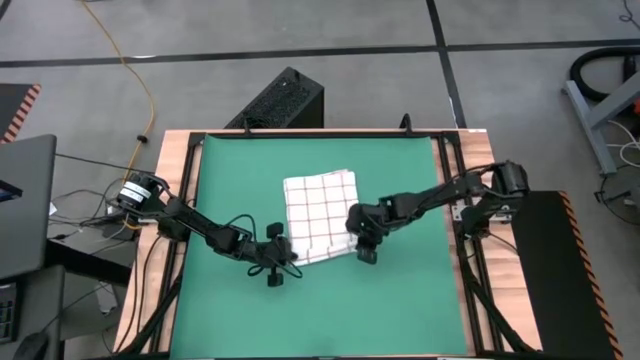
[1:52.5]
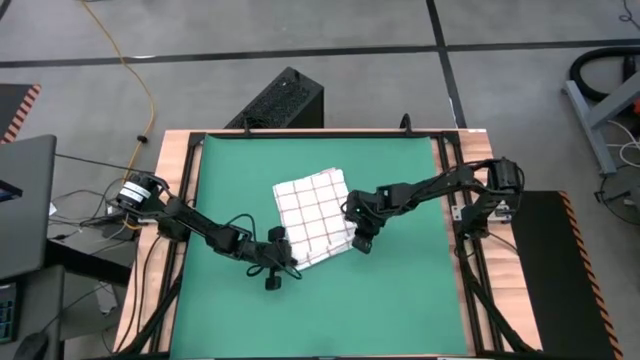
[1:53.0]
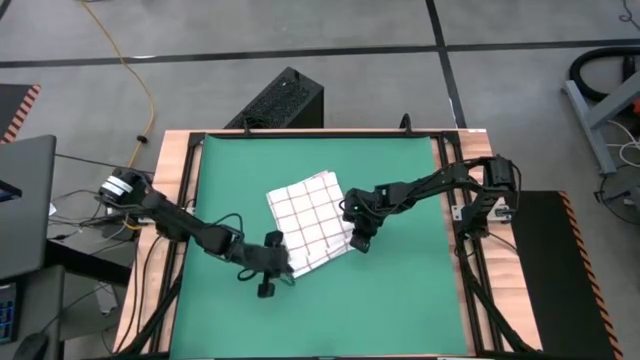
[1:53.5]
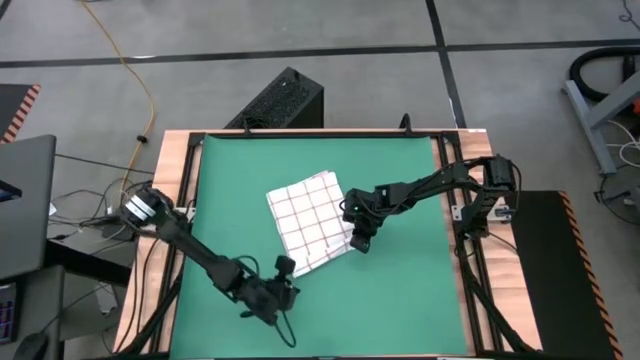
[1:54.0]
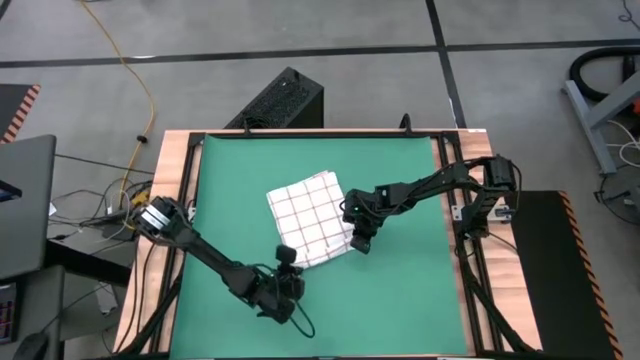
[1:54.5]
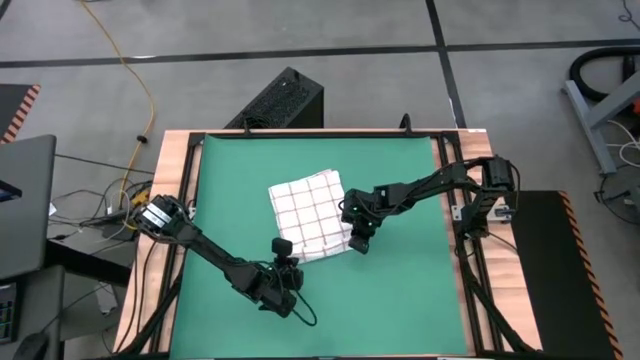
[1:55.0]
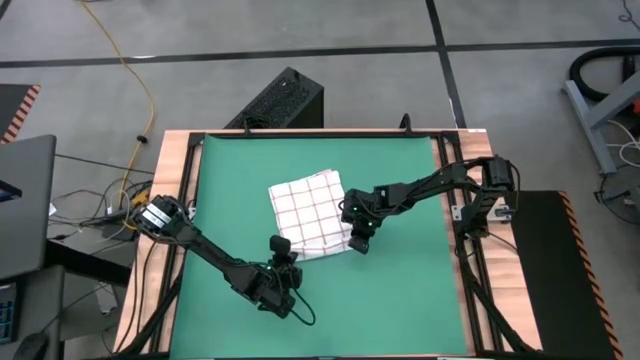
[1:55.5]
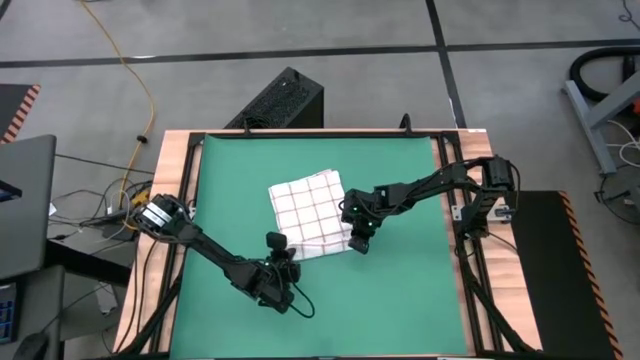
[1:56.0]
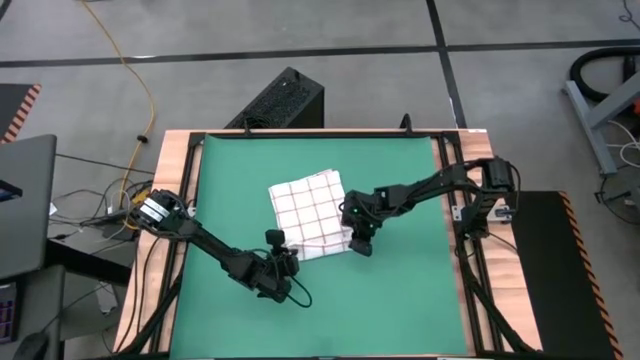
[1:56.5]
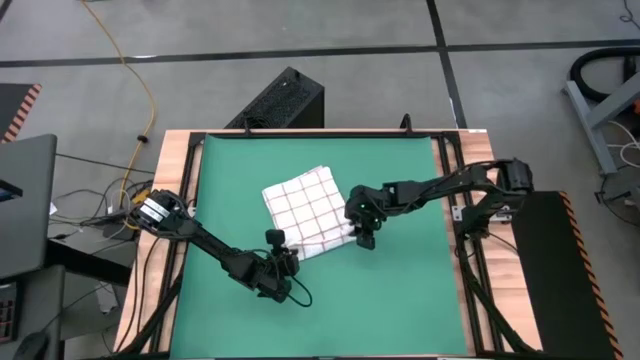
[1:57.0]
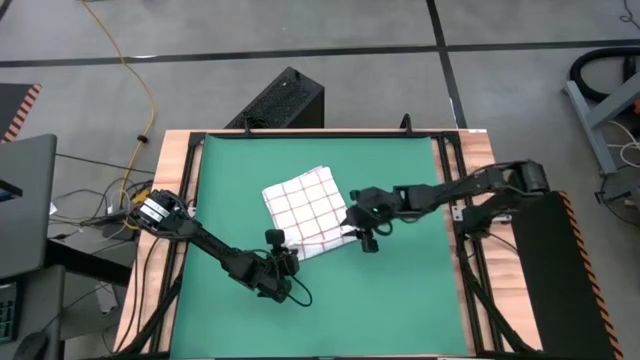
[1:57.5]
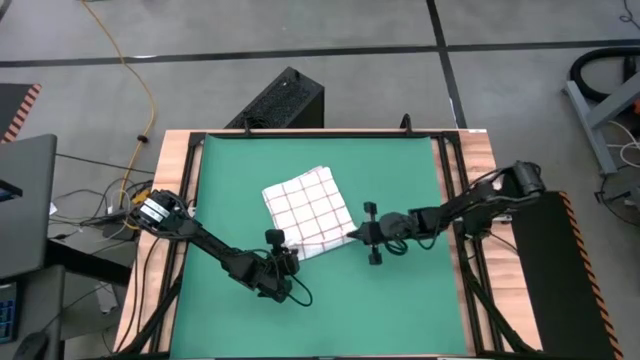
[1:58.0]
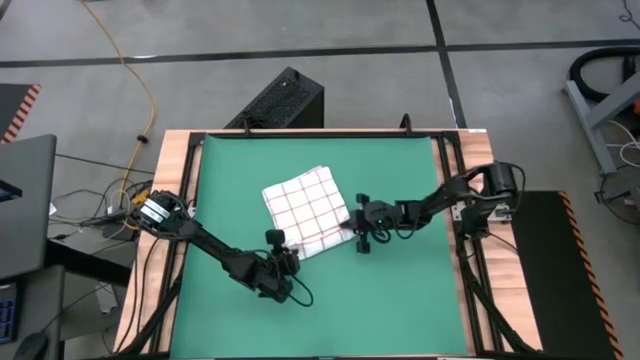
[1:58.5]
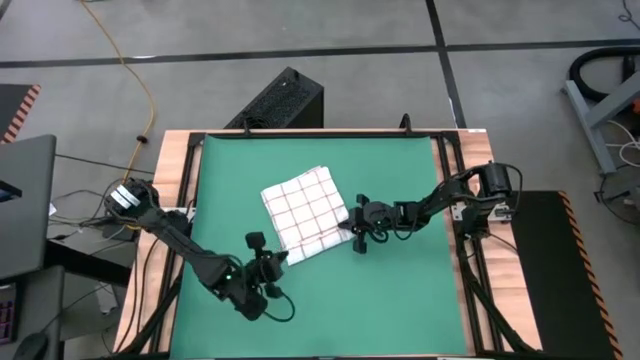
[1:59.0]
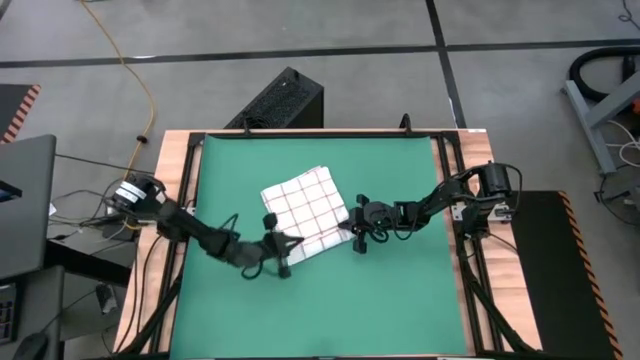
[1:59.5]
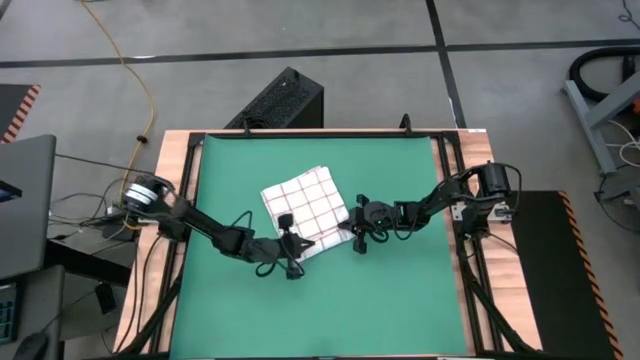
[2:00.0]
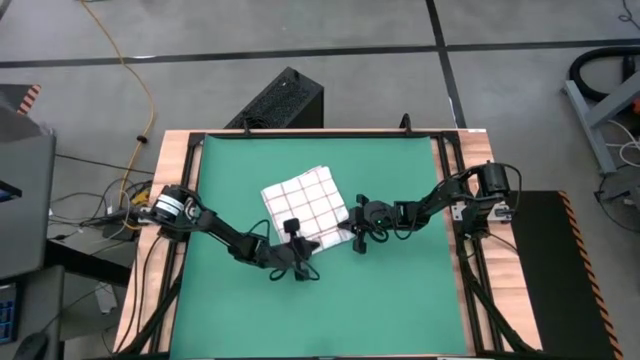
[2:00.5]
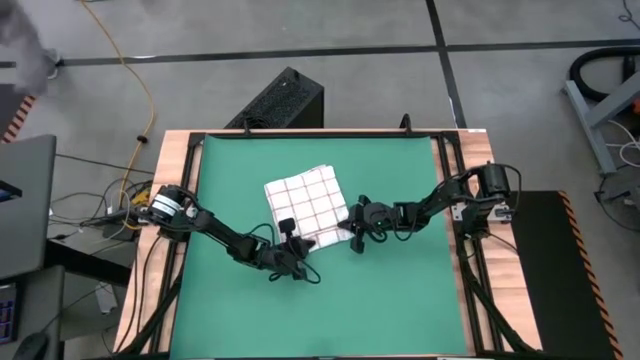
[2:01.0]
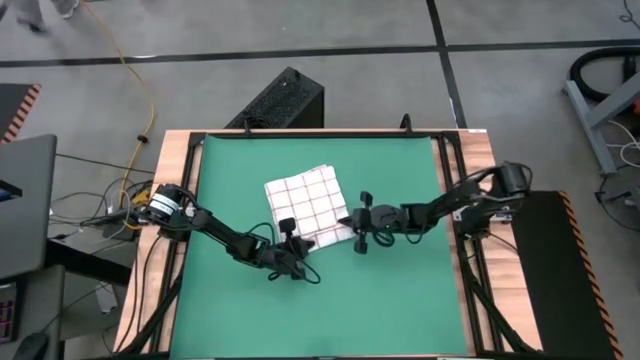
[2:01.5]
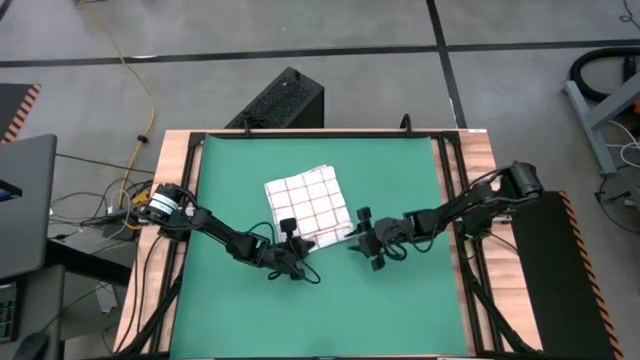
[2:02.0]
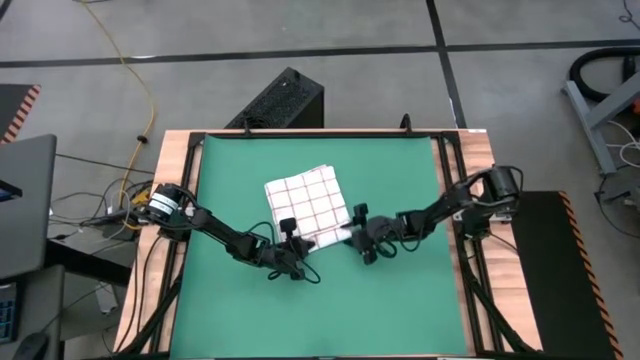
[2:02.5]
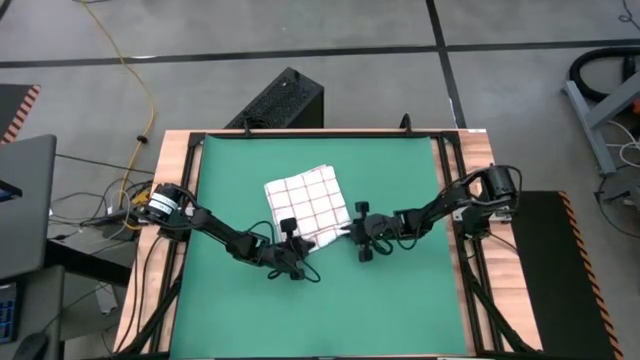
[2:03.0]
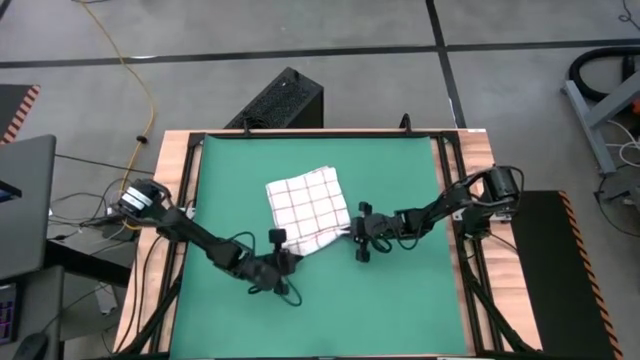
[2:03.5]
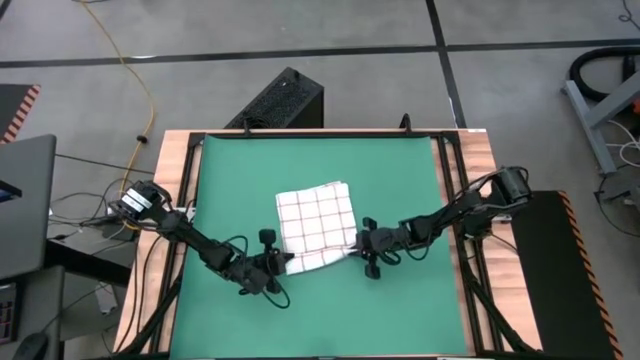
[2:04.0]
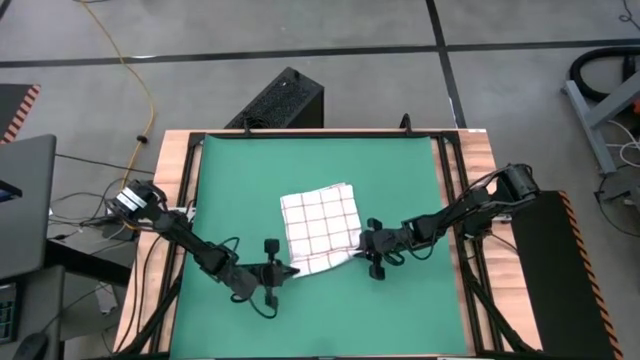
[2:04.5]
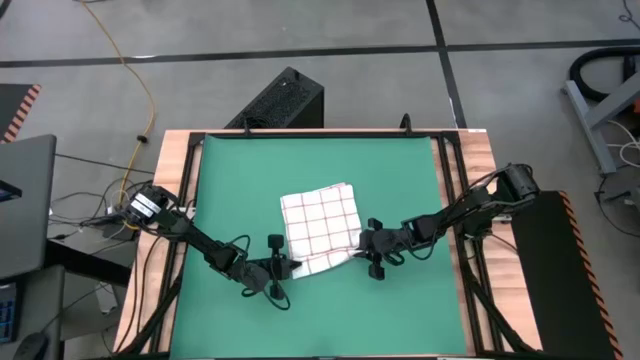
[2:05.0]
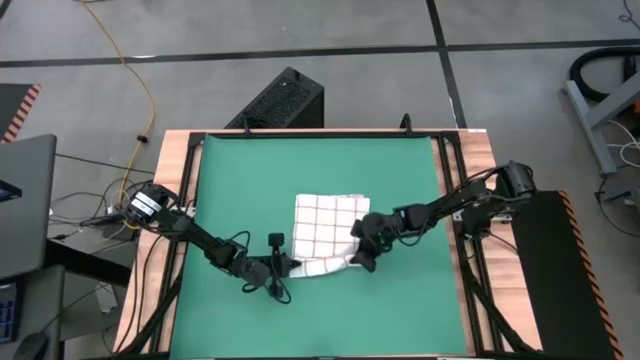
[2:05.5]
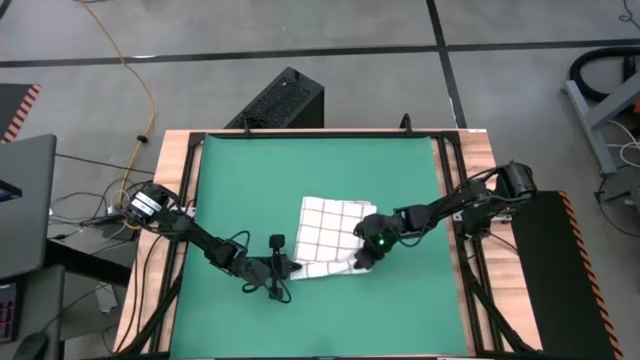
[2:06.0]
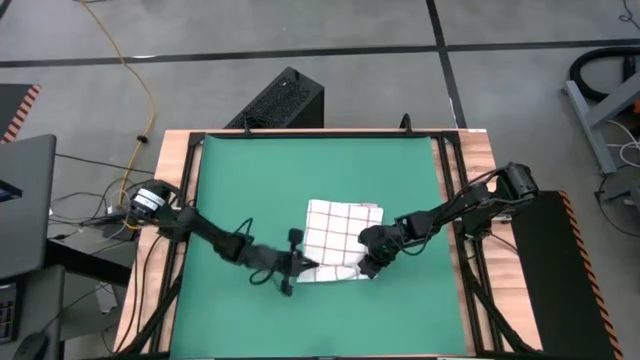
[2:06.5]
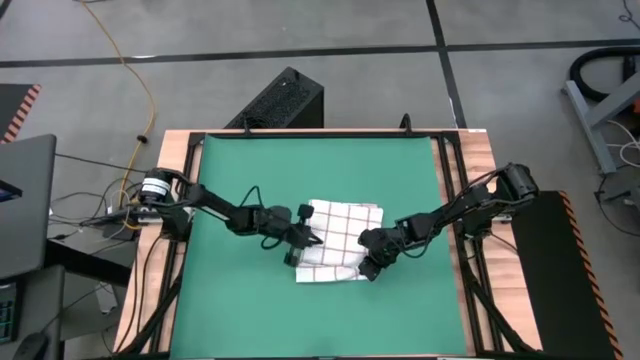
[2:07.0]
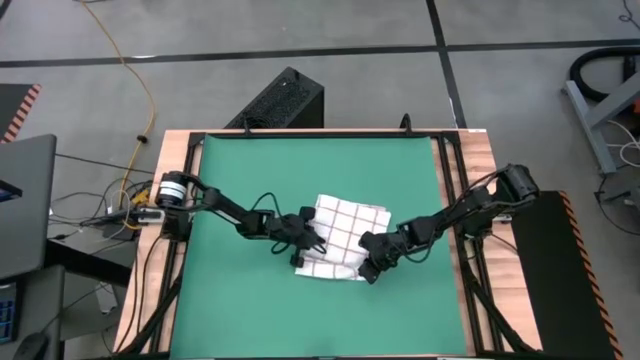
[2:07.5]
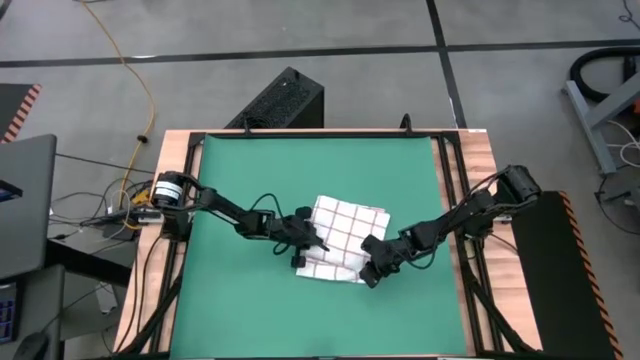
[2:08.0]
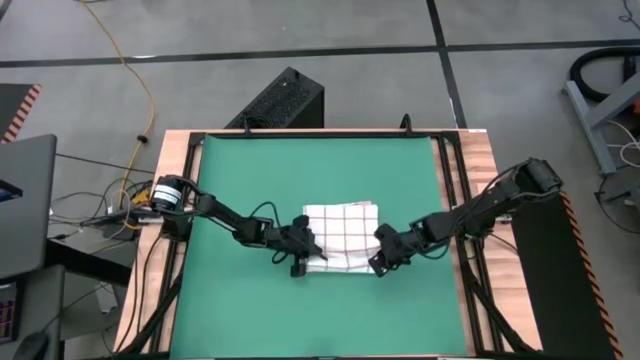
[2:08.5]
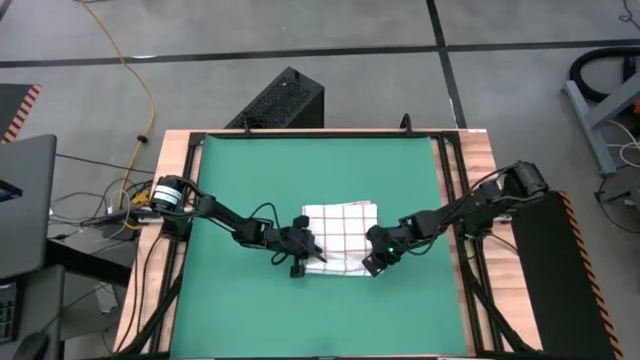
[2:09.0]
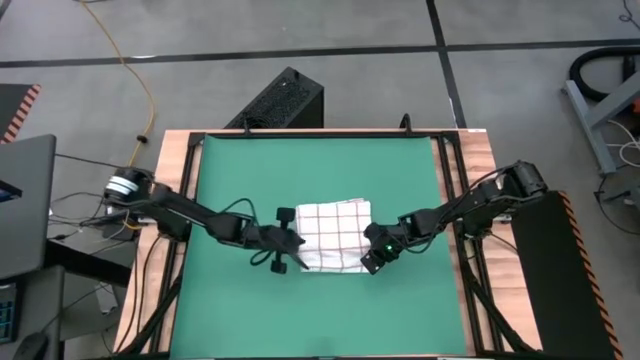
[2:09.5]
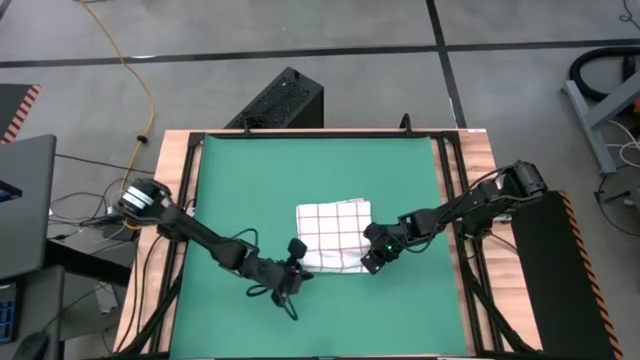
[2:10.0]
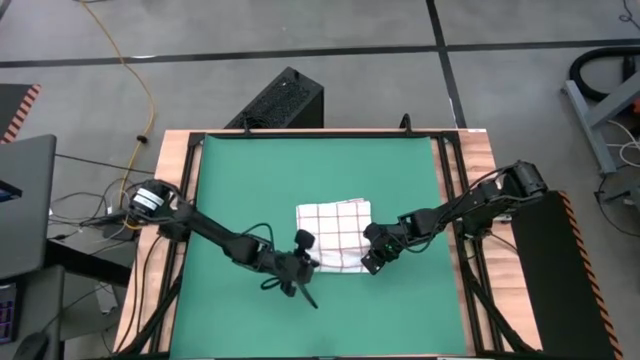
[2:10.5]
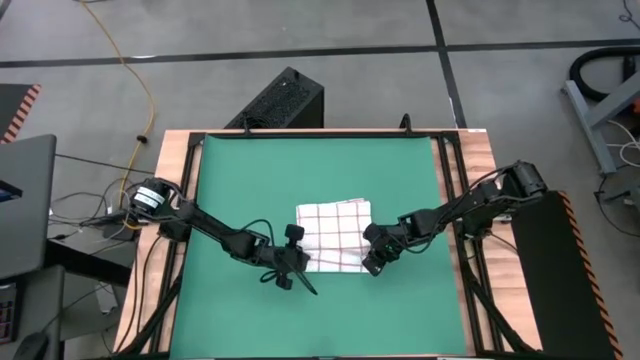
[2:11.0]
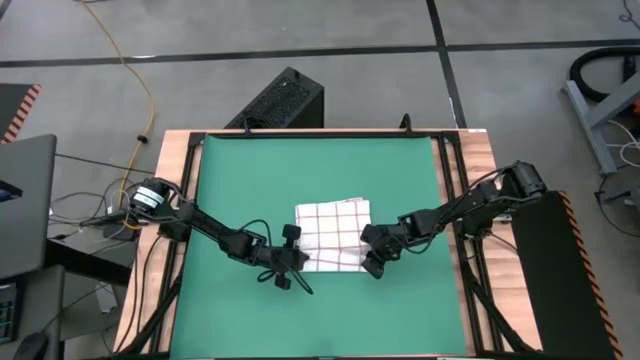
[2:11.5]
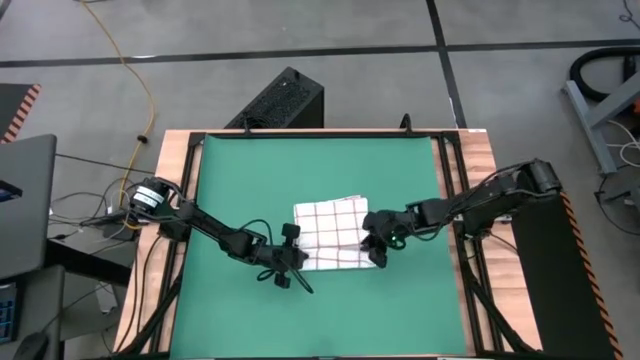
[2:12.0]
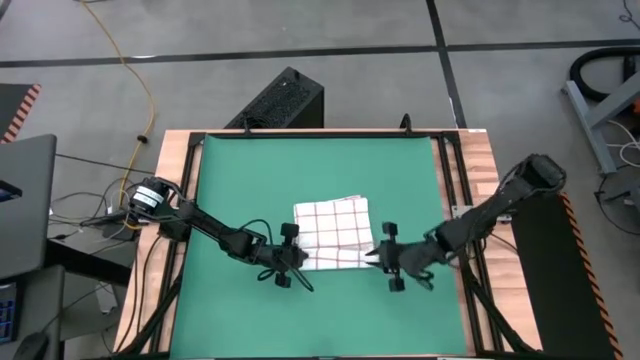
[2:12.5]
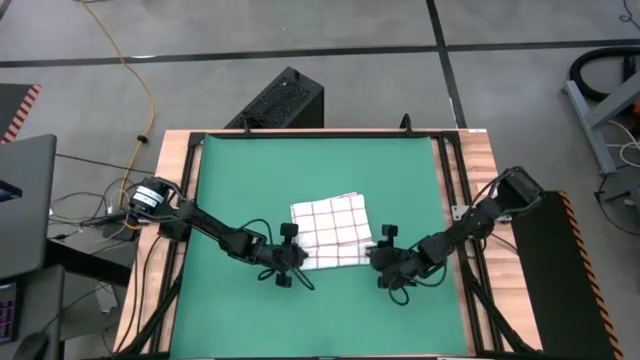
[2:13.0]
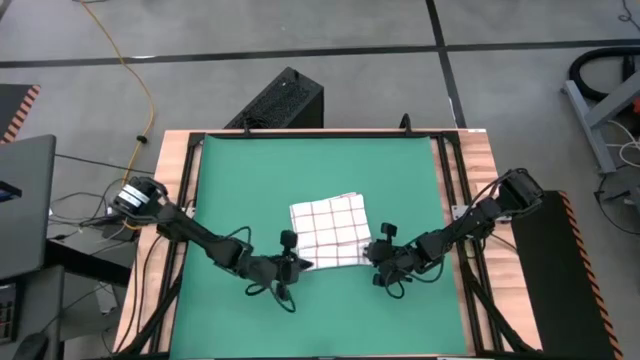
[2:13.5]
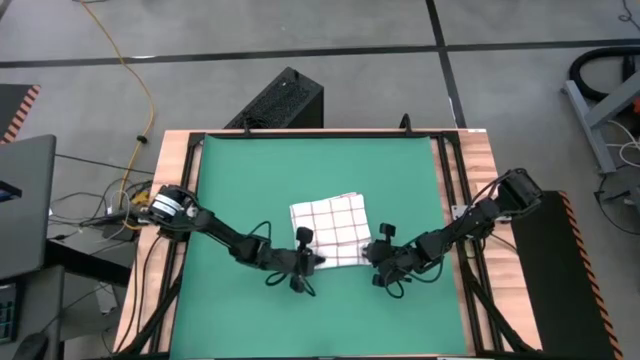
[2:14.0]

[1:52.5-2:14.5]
Task: Roll towel into tight, uniform cylinder
Roll the kitchen towel on the table
